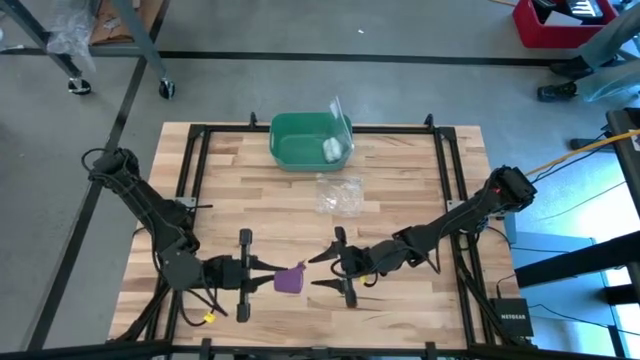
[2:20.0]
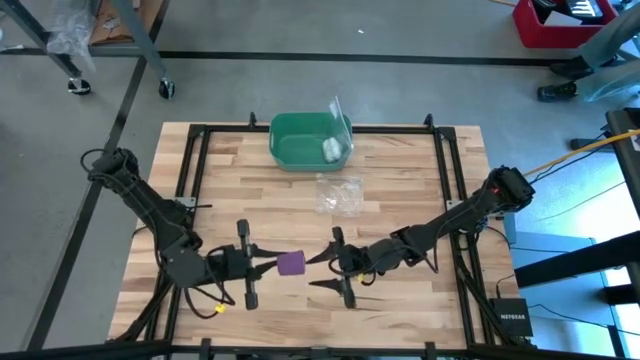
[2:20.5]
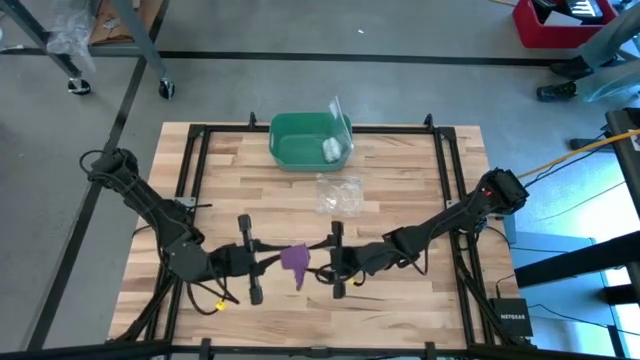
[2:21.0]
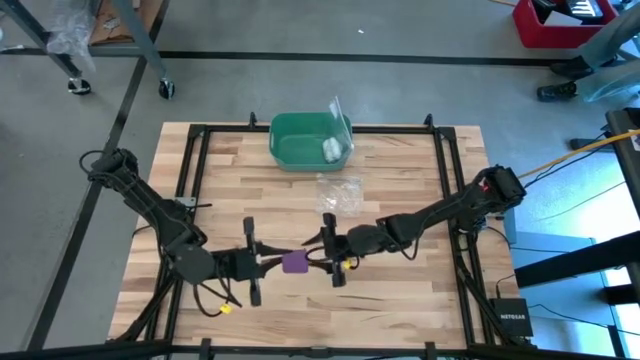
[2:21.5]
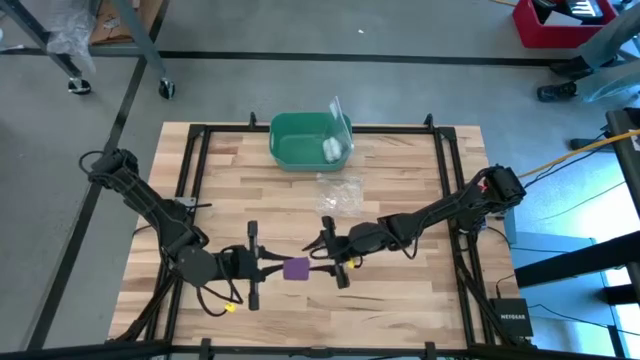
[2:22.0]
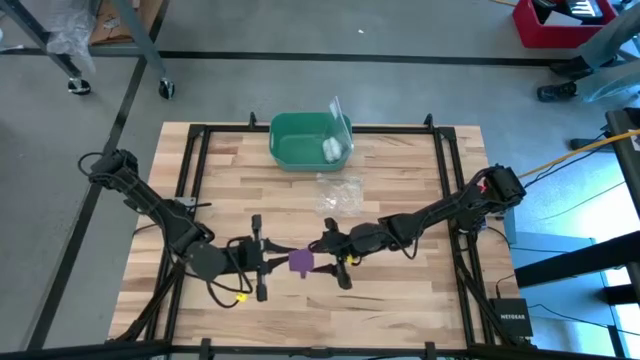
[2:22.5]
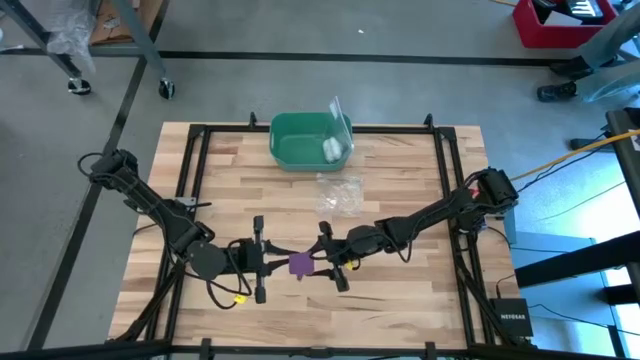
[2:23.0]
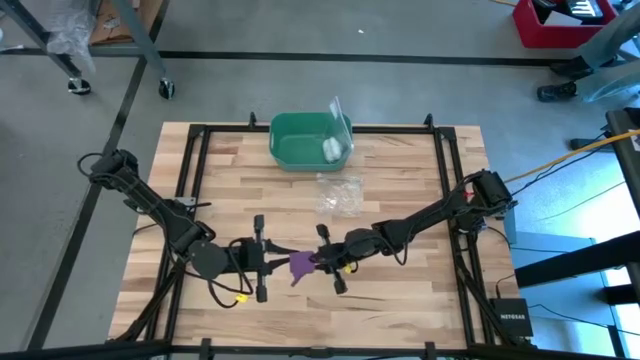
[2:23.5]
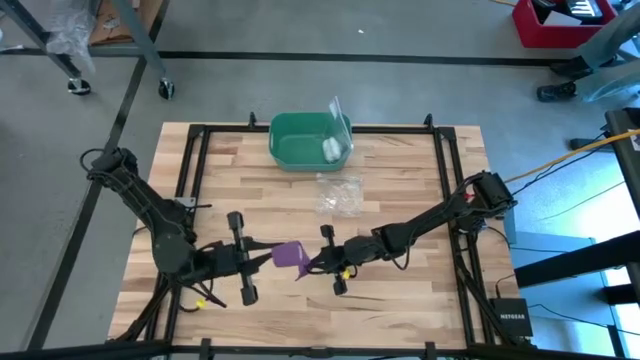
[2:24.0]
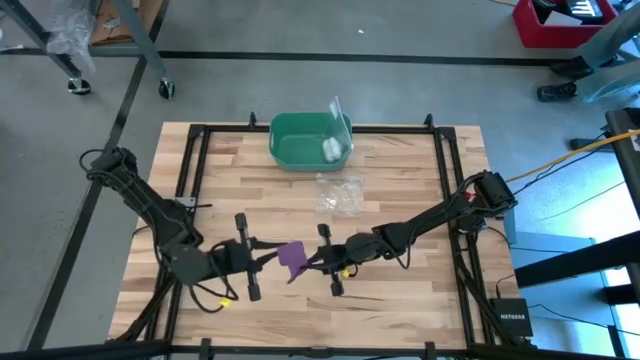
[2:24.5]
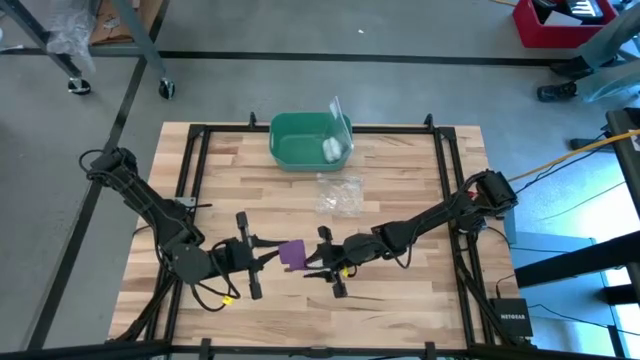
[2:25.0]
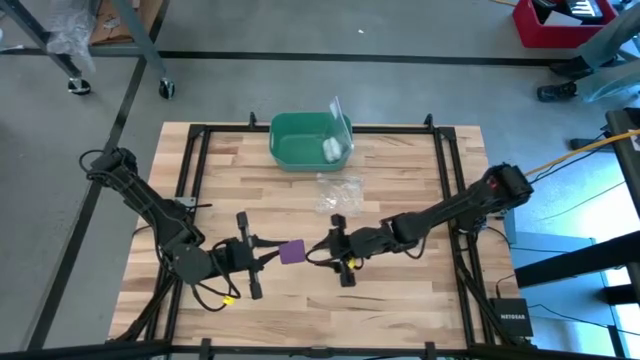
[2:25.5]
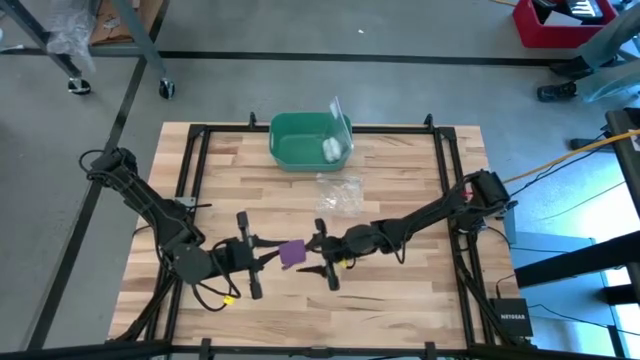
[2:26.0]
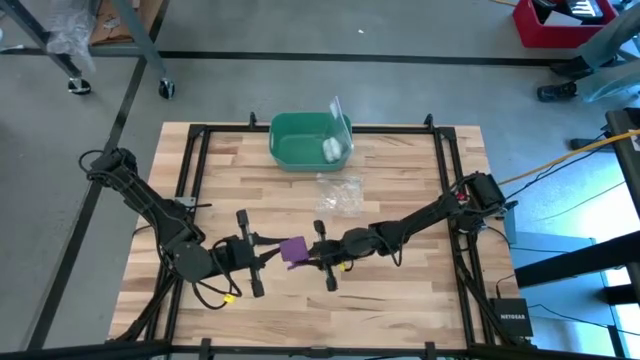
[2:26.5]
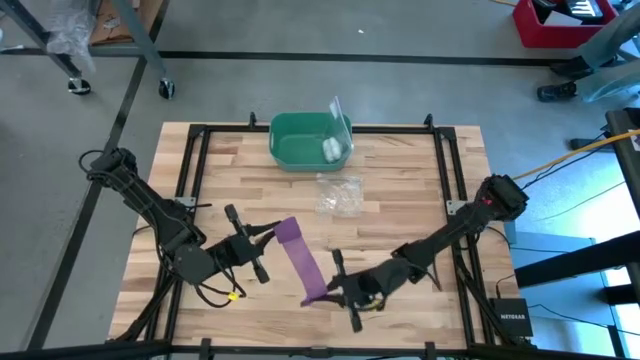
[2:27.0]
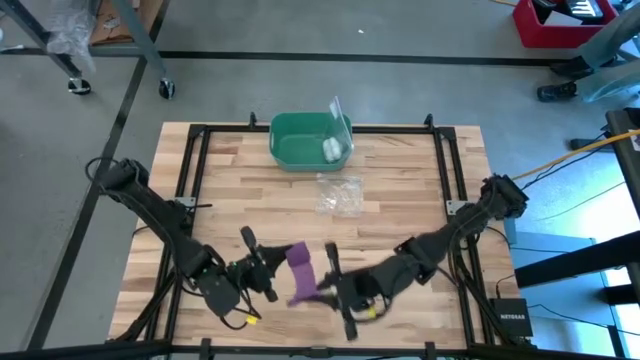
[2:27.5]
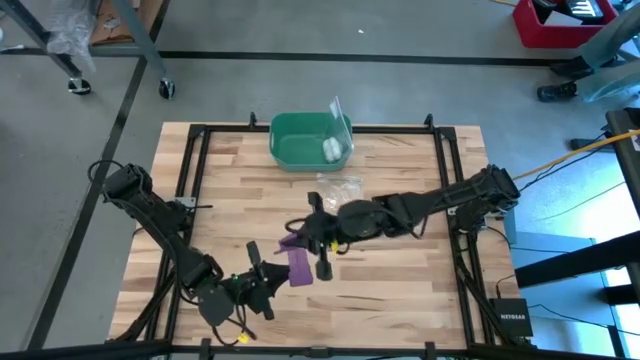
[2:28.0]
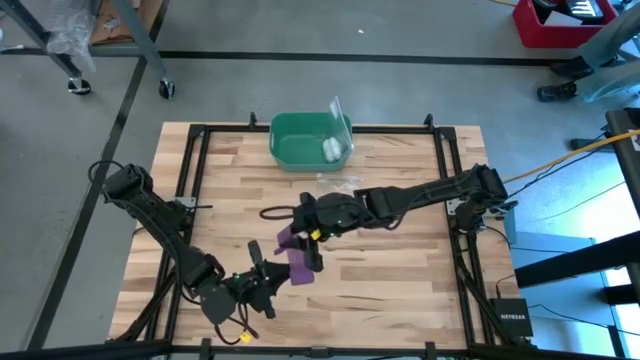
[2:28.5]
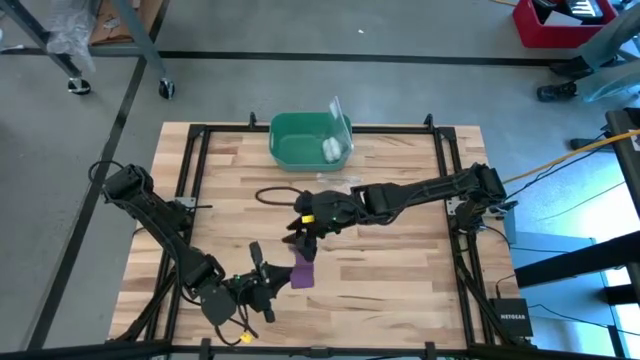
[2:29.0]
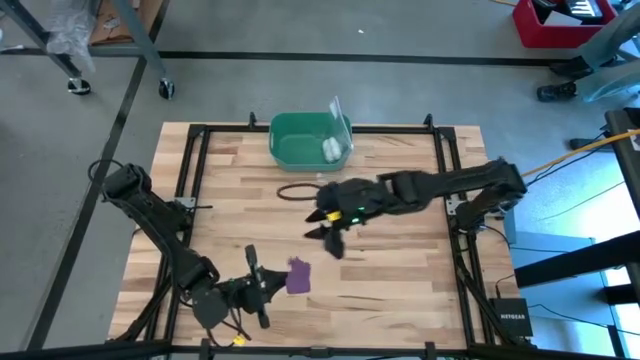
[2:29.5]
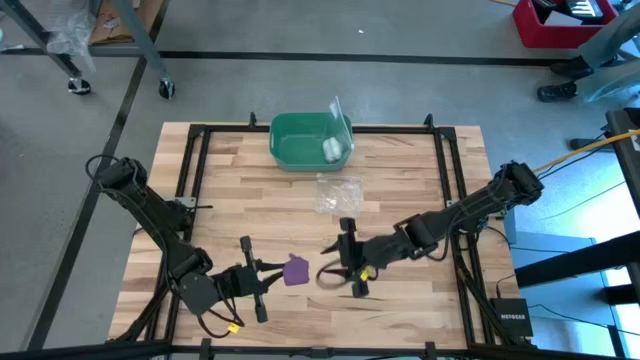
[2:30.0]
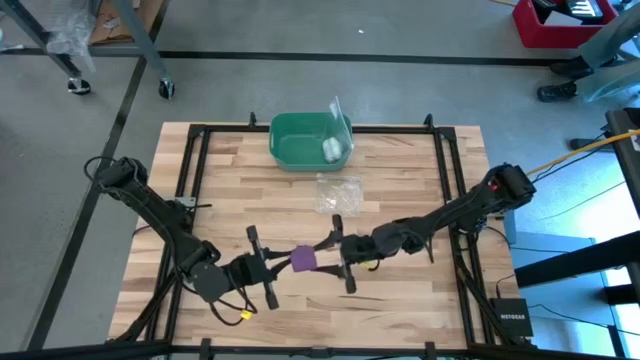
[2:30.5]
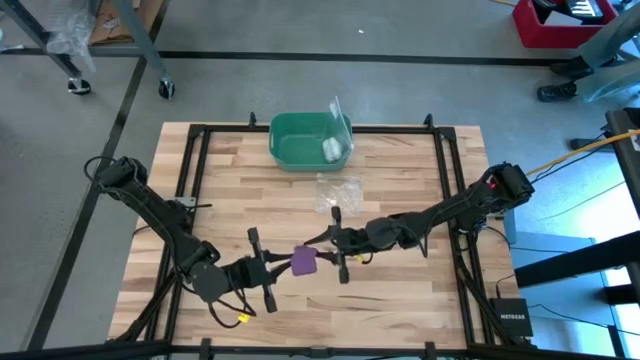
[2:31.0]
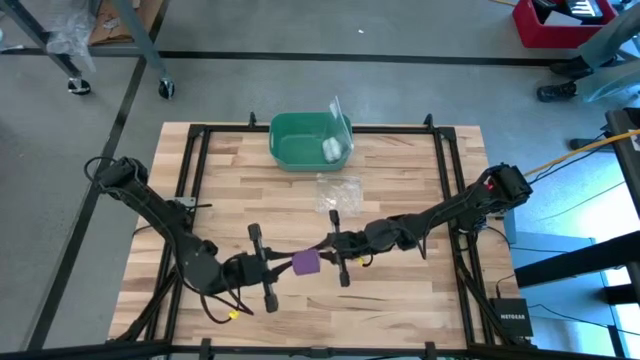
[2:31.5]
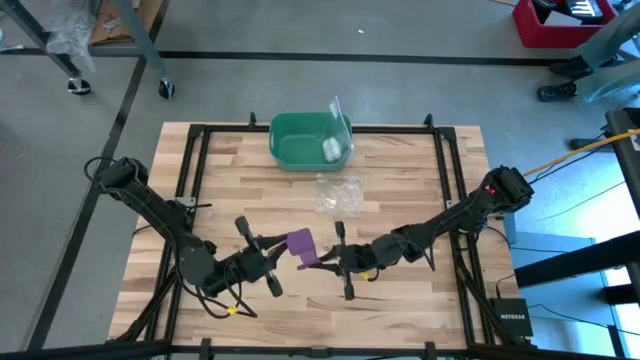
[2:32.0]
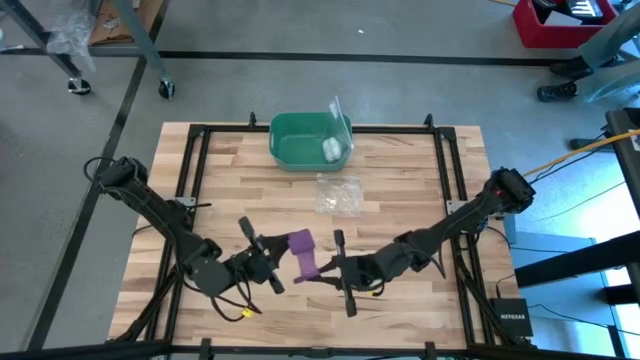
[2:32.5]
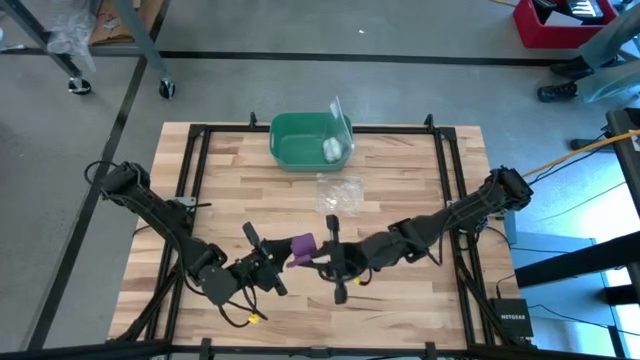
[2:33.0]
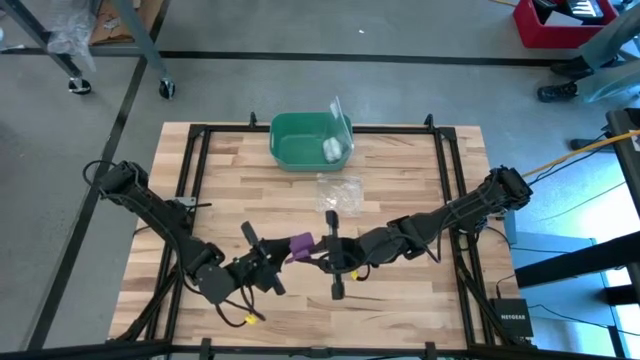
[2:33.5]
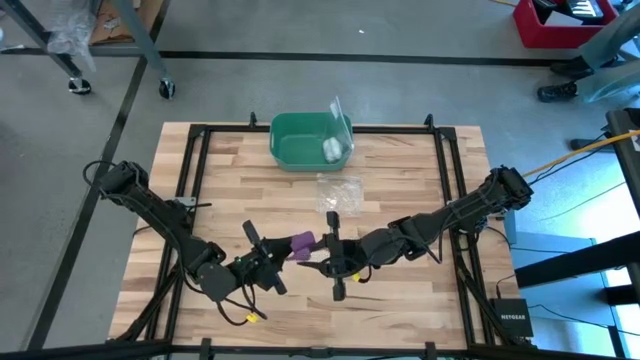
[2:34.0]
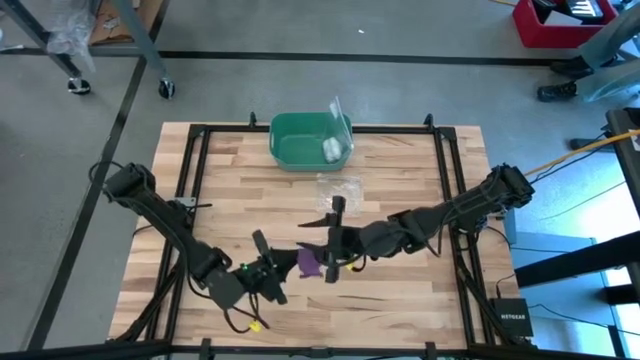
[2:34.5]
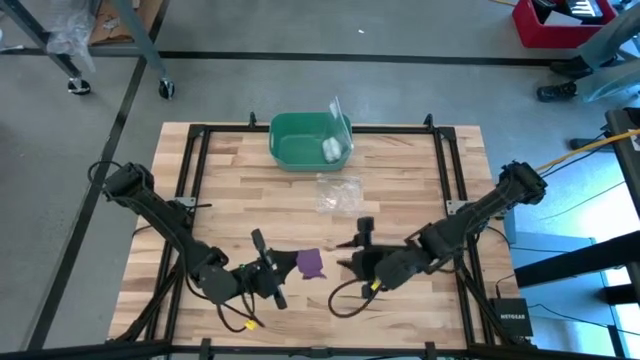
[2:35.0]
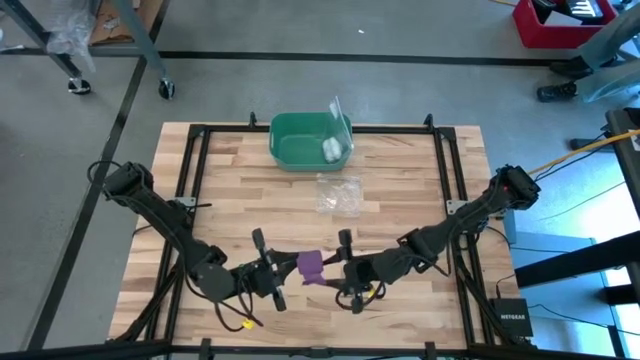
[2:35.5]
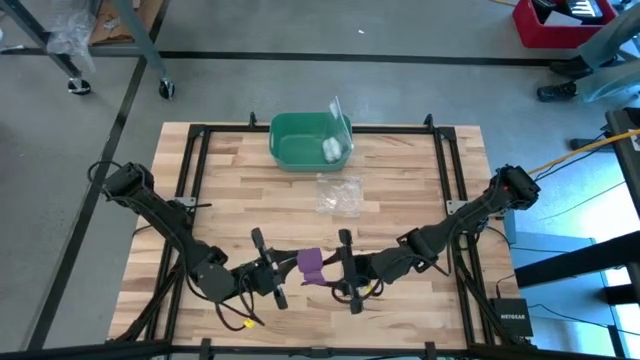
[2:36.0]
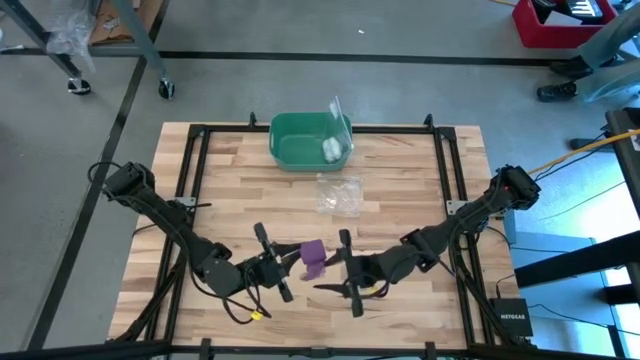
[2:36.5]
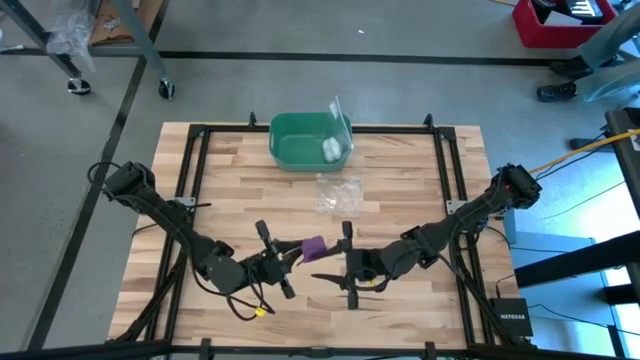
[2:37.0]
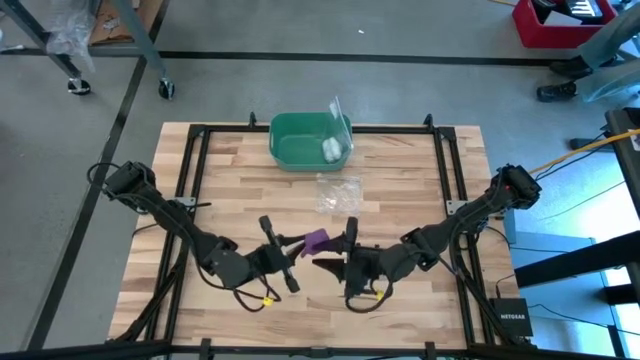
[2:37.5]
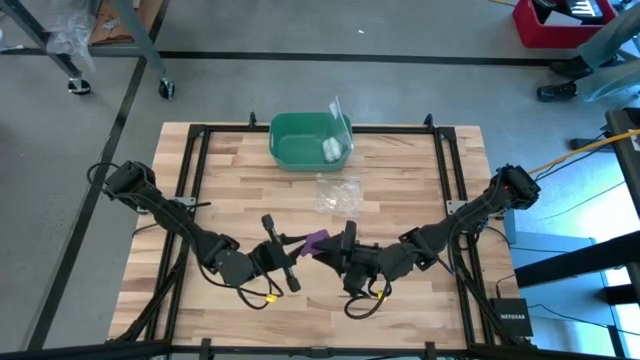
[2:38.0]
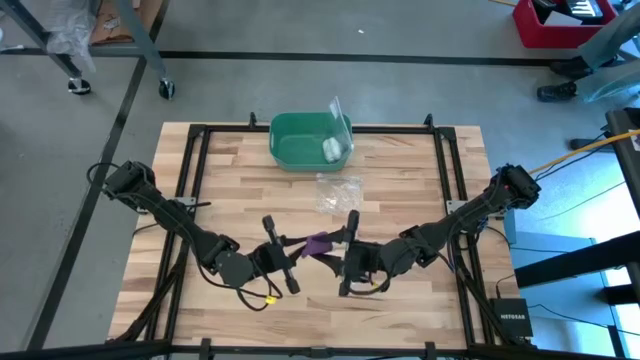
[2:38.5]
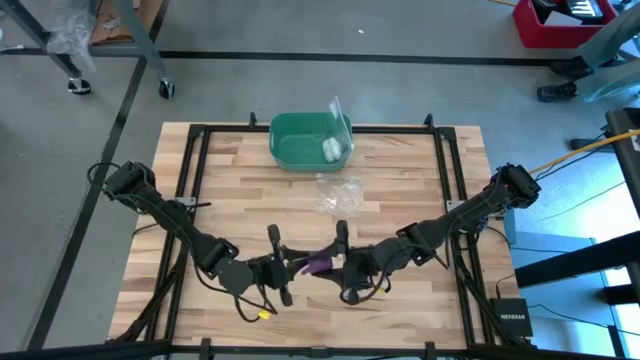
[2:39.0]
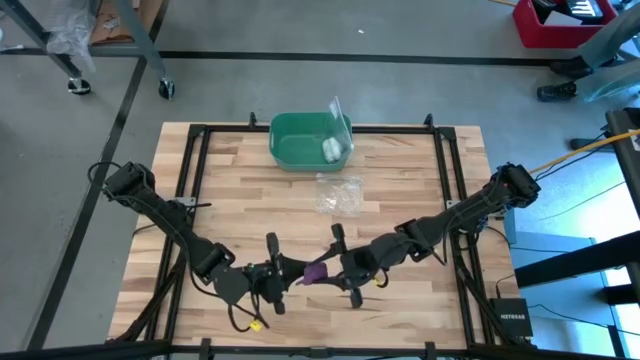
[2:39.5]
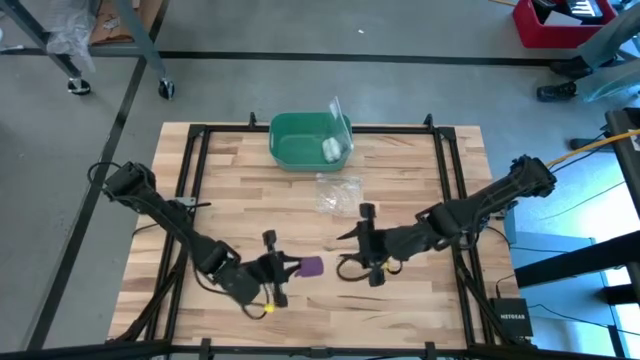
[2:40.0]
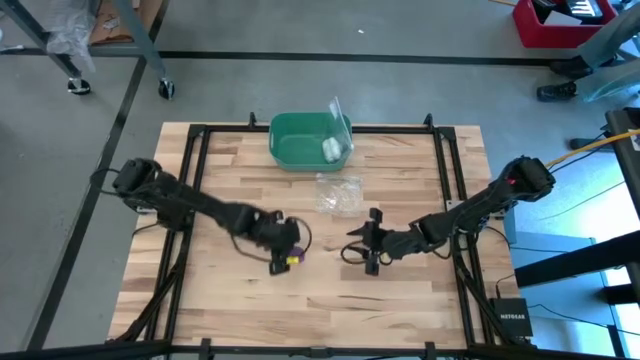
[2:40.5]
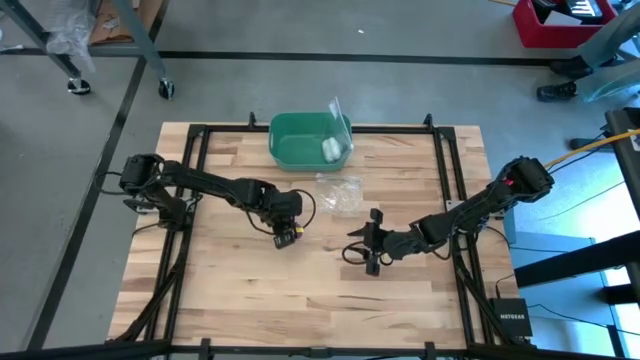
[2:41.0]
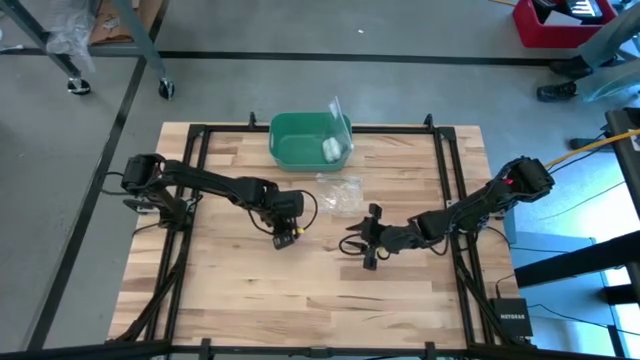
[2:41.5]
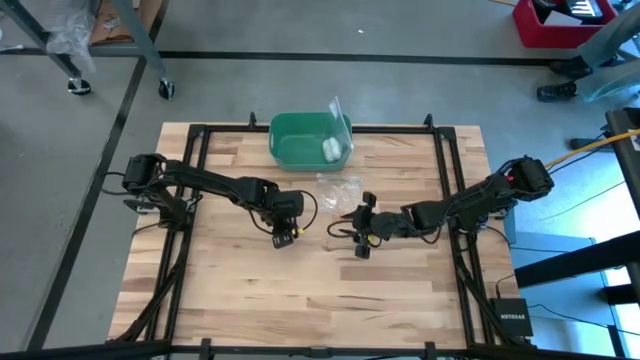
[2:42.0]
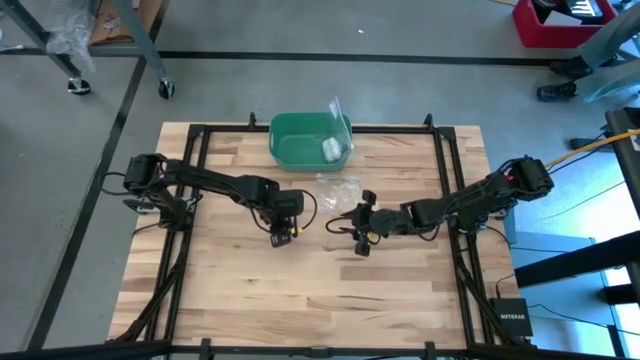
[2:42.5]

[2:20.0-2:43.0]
Task: Roll bandage
Roll the violet bandage
